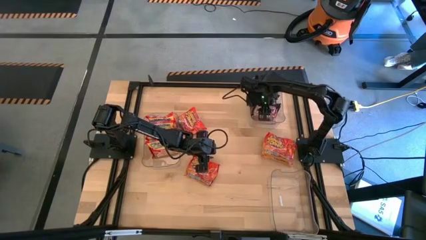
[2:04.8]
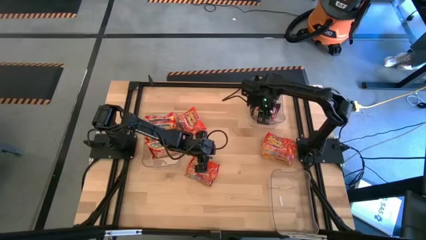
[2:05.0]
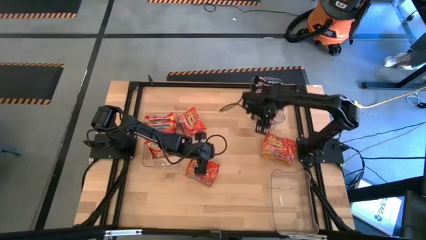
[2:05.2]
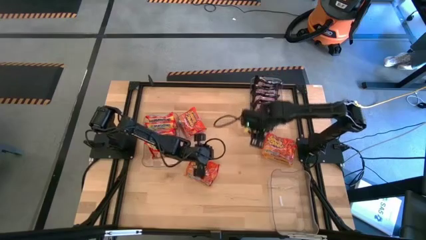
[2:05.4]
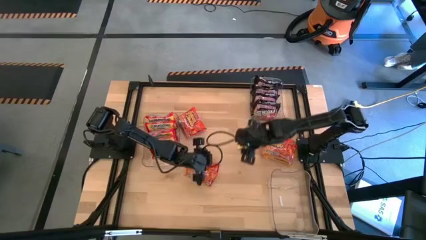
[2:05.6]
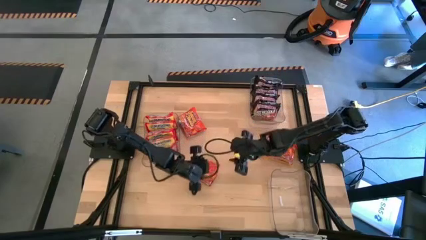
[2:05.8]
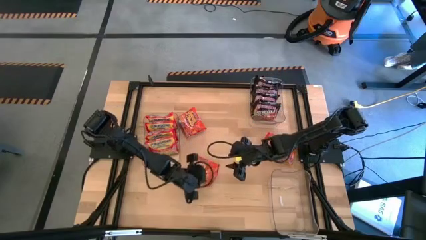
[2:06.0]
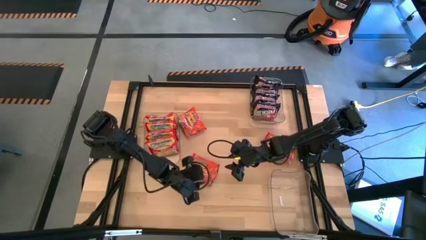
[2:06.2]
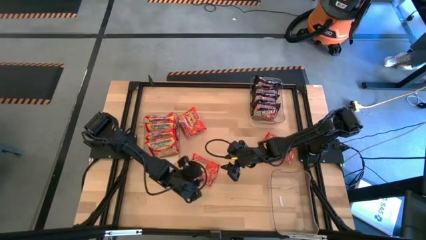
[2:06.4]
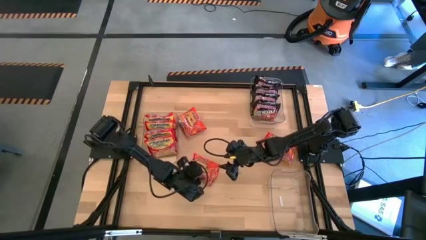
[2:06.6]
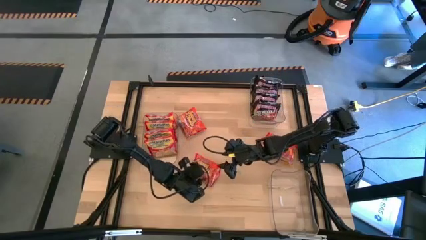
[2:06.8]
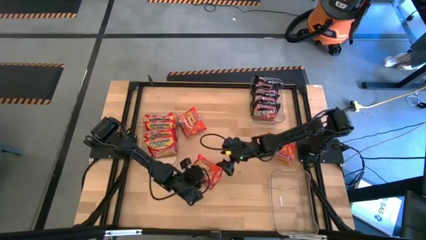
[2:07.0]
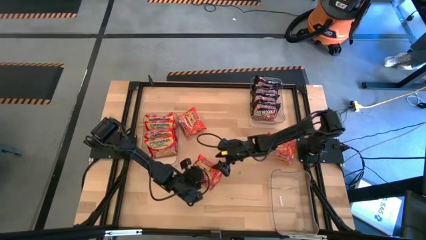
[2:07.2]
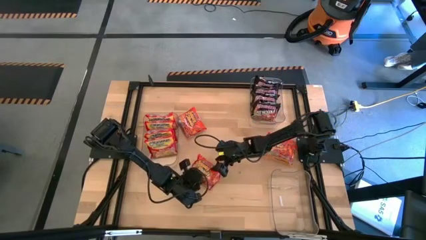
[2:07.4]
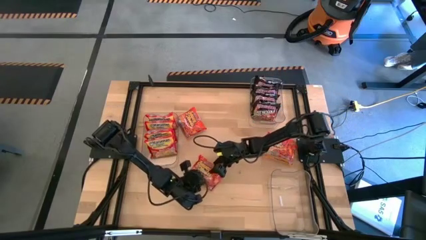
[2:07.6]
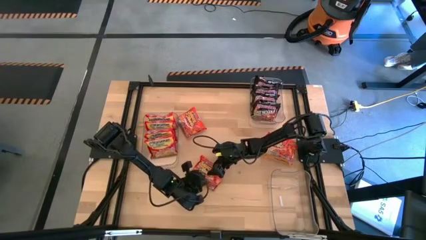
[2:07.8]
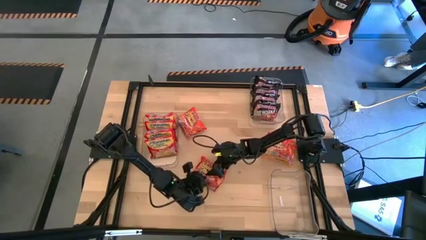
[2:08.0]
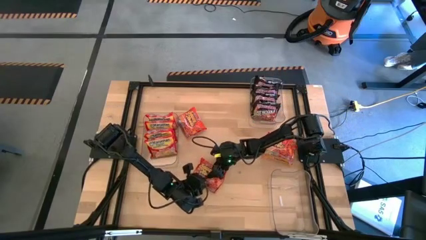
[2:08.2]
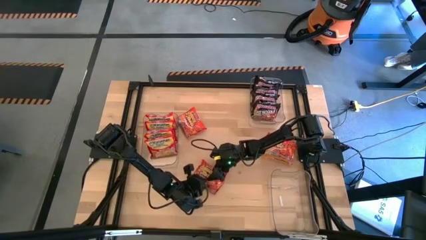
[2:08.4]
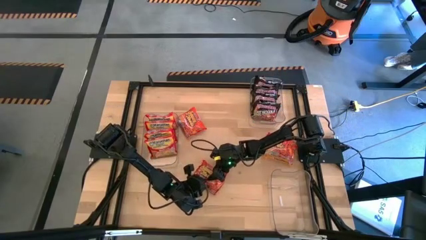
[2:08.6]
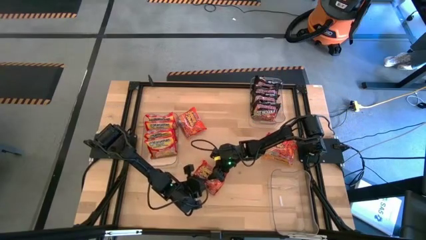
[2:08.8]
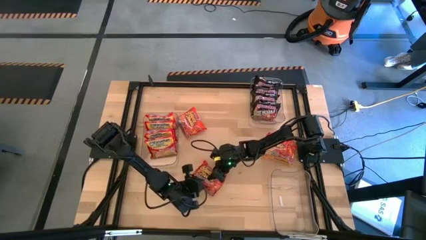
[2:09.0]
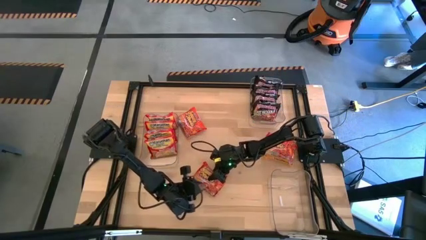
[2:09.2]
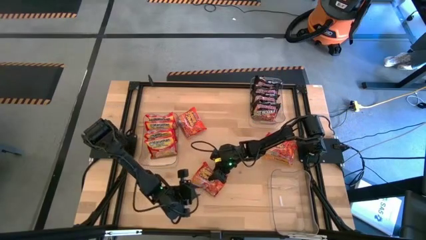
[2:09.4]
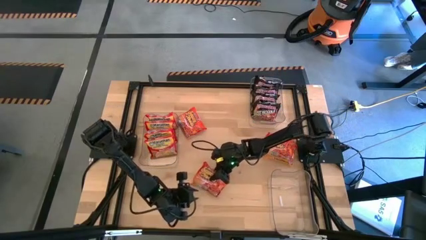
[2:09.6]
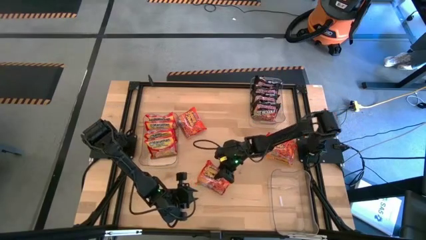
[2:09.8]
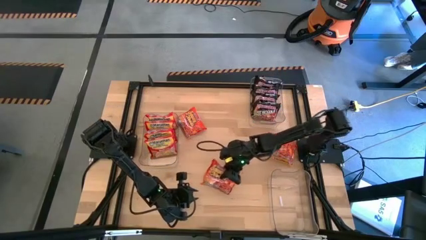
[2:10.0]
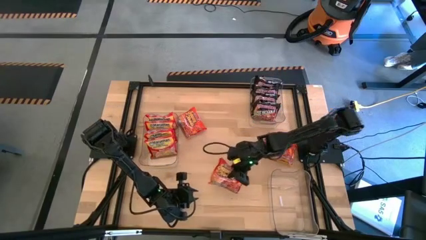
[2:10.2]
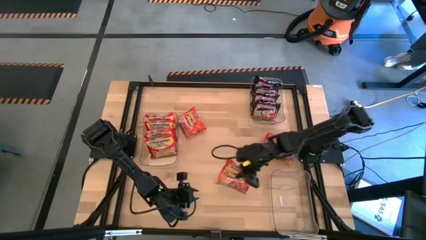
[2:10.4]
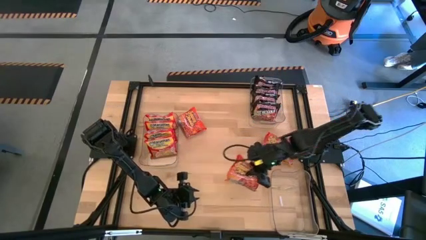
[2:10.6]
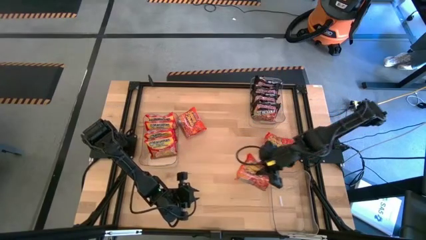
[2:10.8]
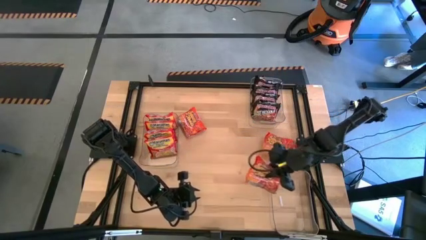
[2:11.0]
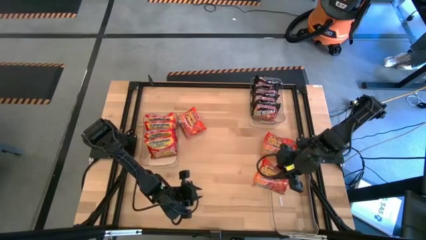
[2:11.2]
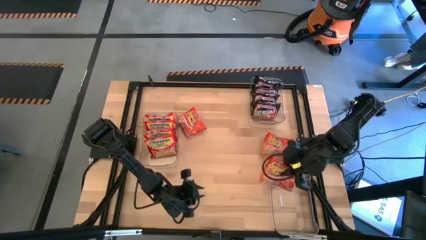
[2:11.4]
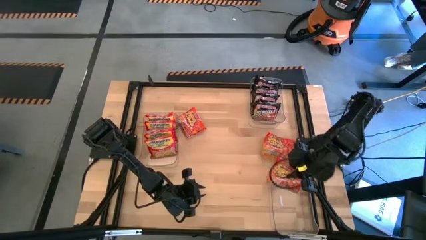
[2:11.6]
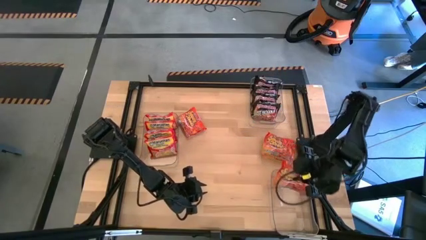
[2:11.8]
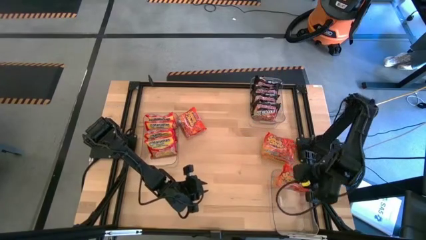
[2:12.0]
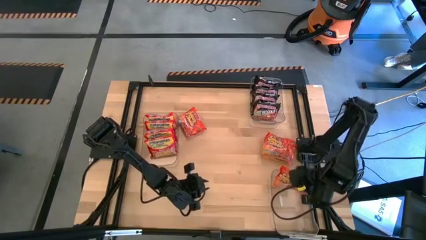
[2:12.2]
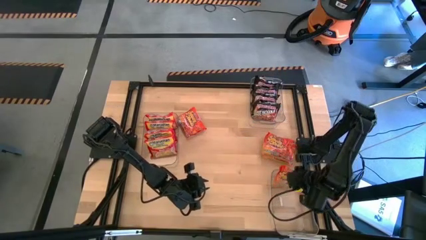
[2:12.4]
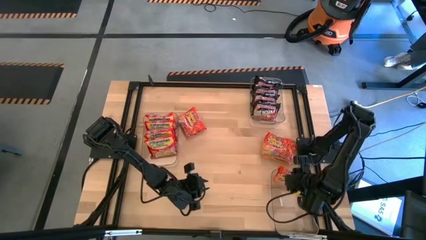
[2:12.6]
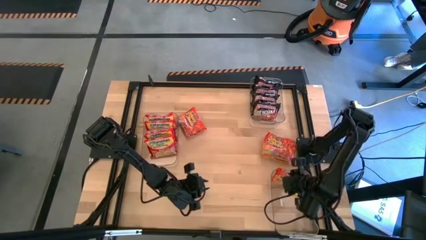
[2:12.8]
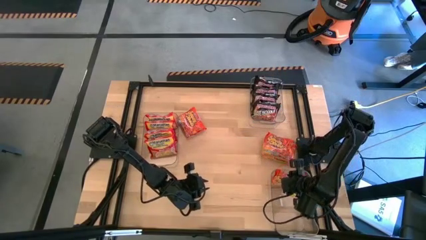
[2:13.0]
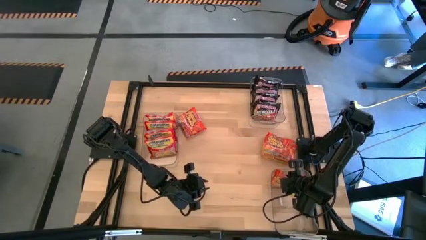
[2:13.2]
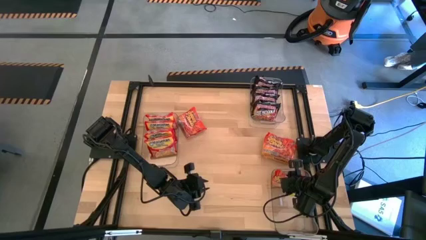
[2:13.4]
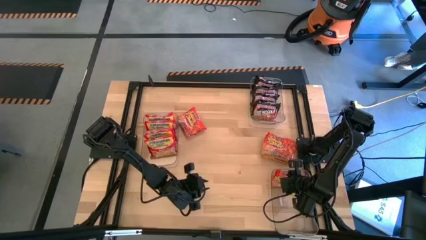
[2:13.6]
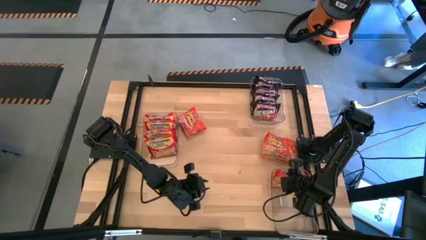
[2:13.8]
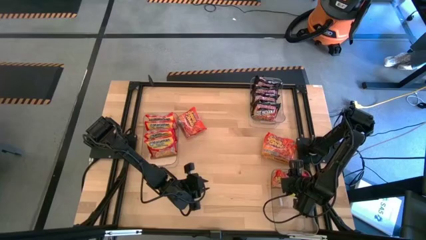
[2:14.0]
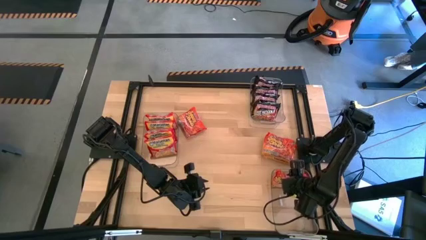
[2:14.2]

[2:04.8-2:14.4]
Task: Sort Maruchan noodles
Put the orange noodle pack into the bottom transparent bin

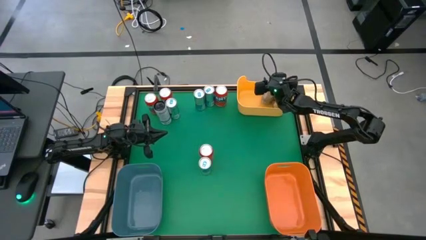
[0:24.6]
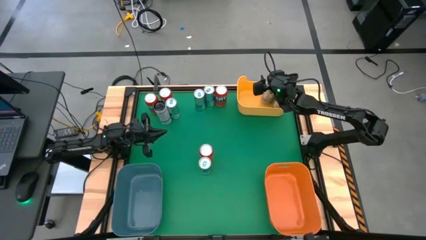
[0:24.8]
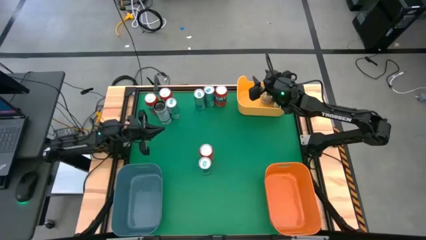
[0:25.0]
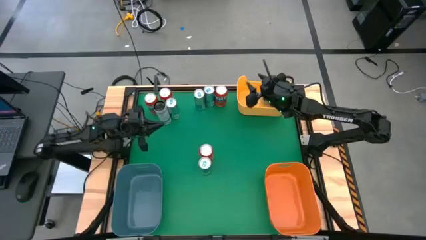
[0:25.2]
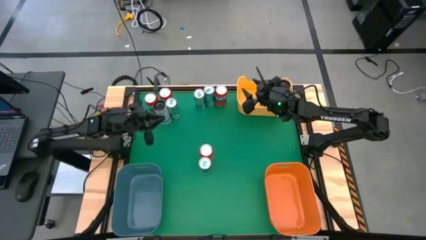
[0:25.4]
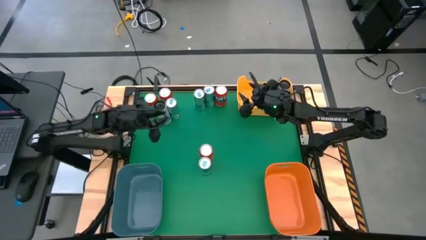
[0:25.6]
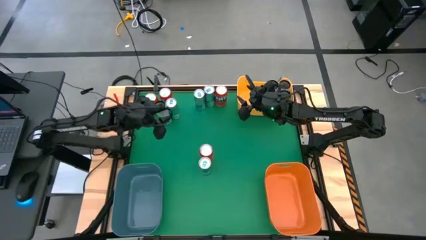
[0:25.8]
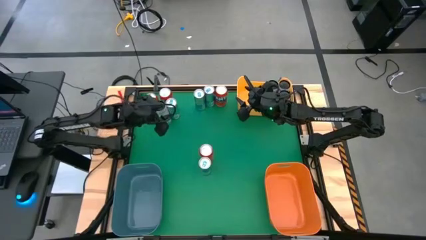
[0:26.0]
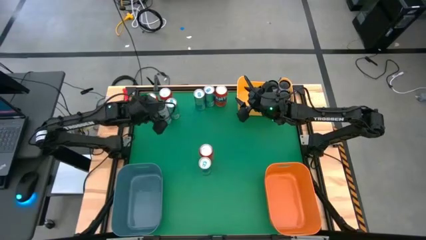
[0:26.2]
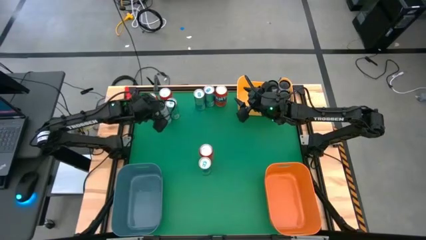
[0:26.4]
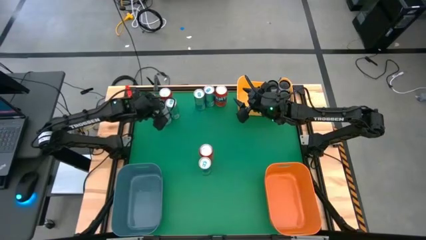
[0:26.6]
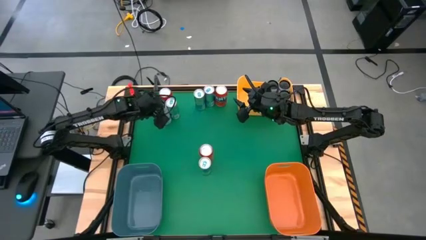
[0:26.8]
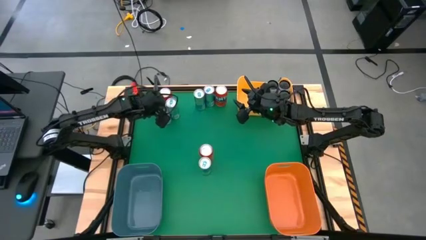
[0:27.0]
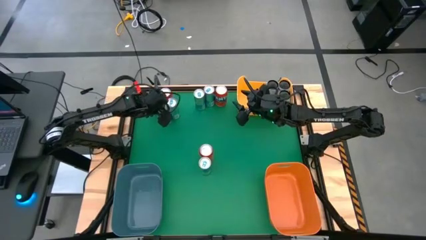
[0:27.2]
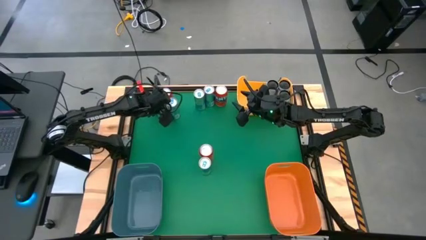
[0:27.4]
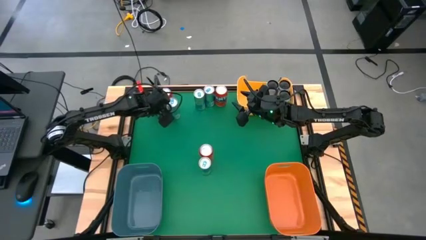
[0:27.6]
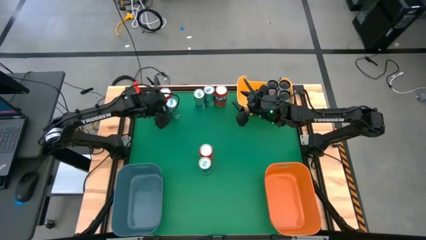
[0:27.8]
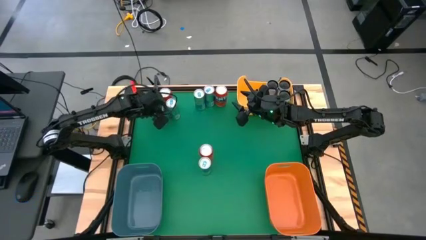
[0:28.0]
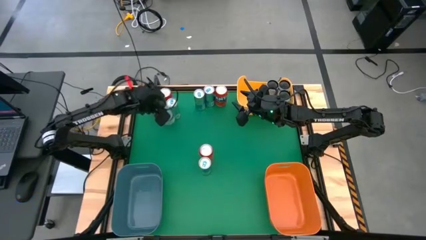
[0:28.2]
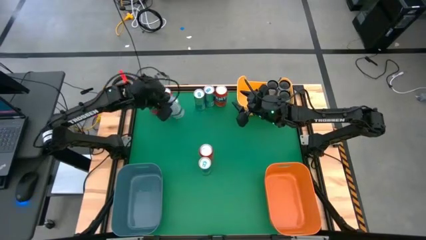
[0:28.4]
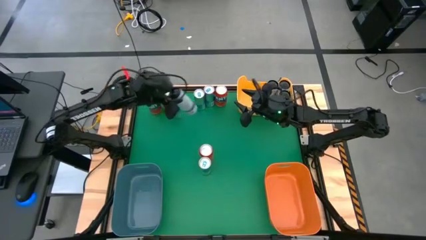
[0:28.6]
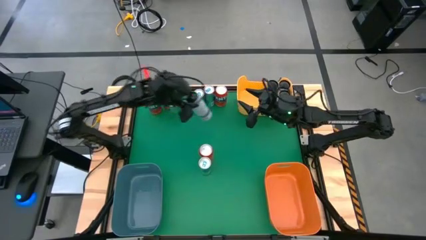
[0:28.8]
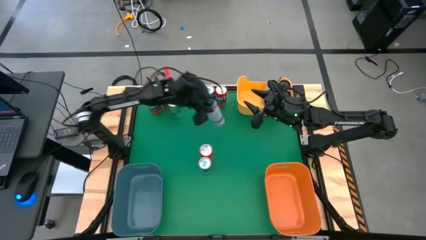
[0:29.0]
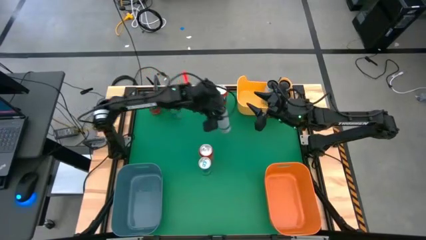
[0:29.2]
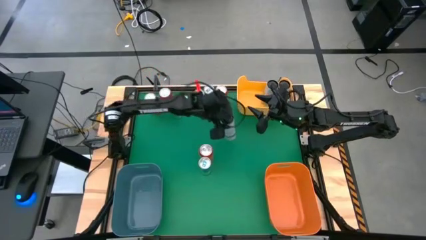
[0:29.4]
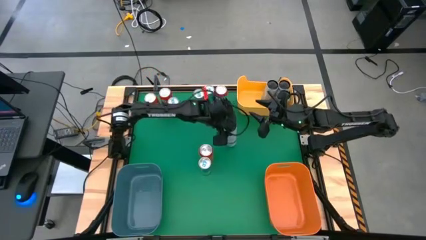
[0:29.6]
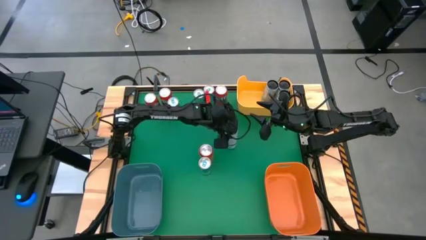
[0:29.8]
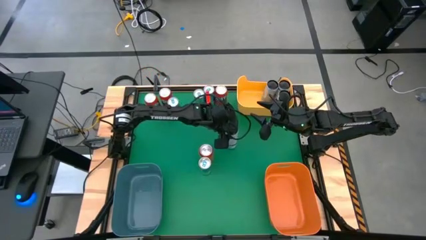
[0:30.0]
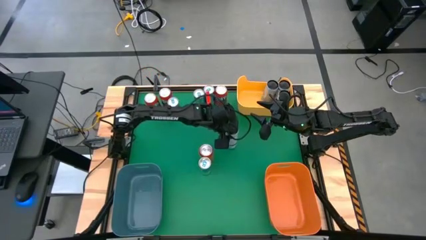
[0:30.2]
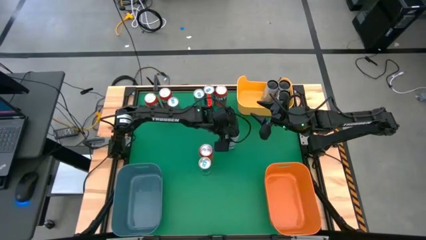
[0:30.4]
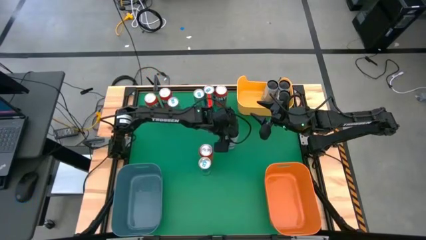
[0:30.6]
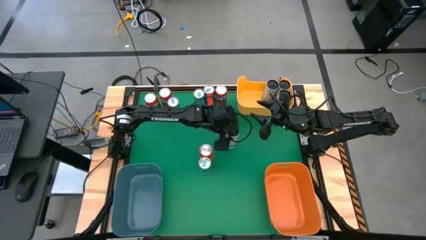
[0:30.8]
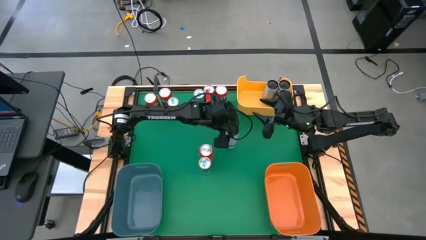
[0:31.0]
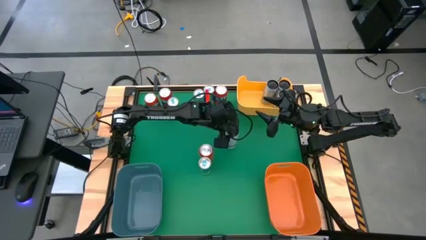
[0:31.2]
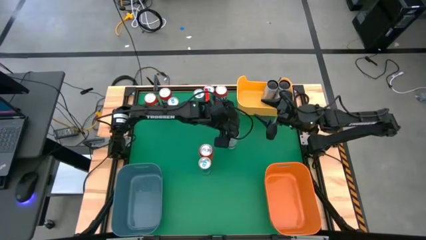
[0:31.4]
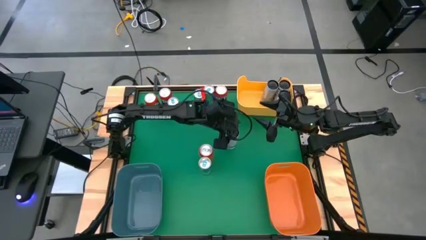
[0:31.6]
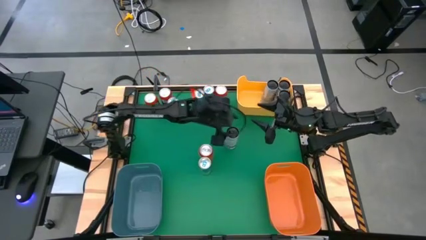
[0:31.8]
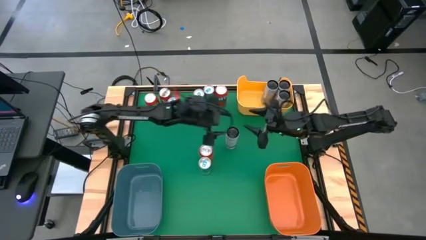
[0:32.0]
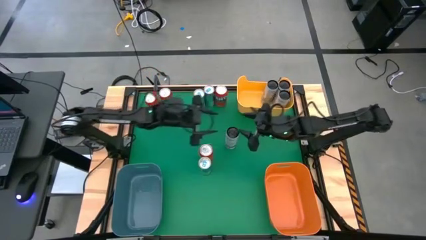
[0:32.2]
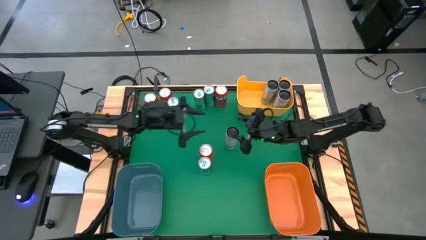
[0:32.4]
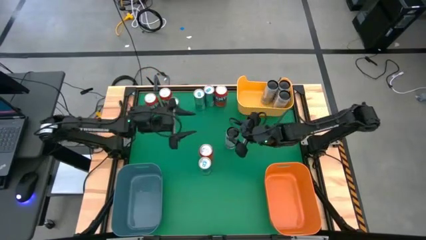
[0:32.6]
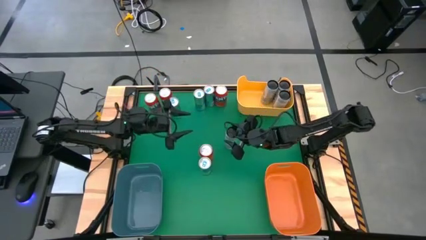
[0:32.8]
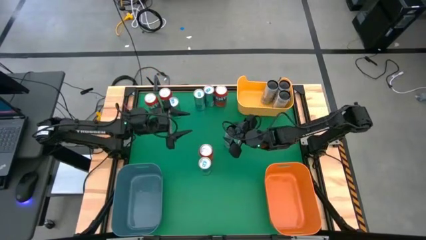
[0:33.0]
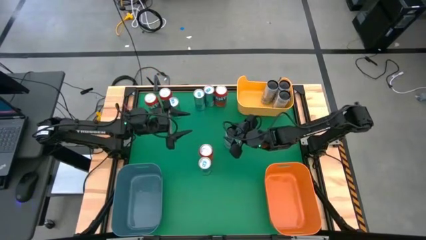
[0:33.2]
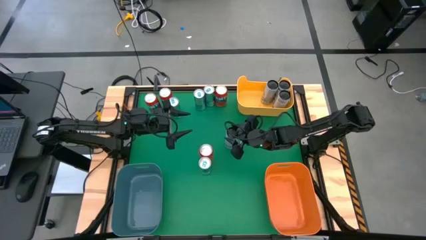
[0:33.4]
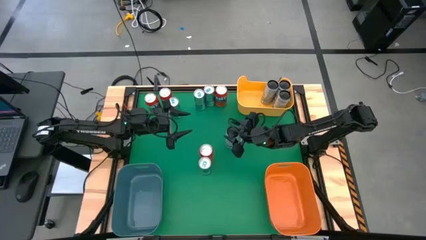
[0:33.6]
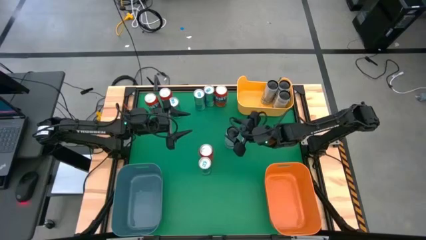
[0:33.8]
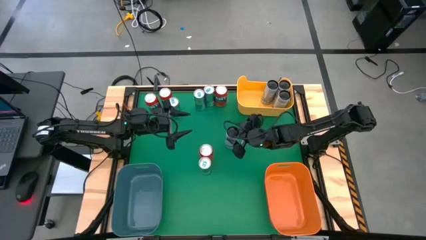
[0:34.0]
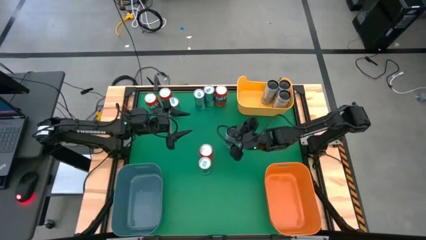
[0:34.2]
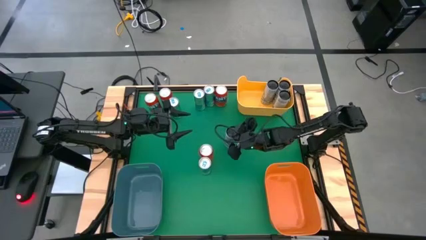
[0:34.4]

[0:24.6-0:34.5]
Task: Sort soda cans
Put the white-blue soda can into the yellow bin
